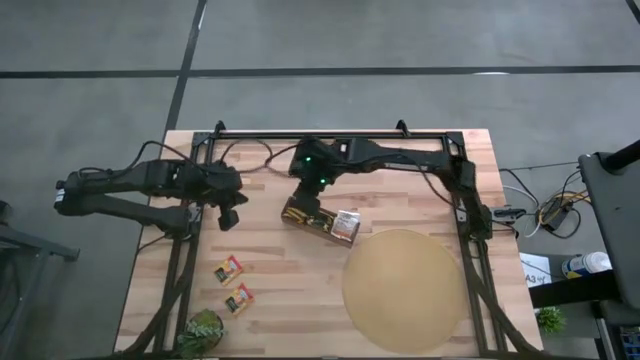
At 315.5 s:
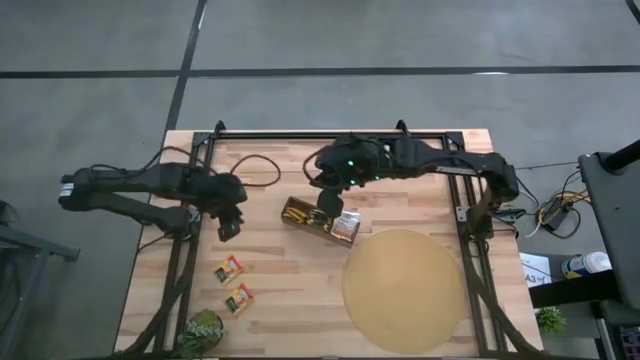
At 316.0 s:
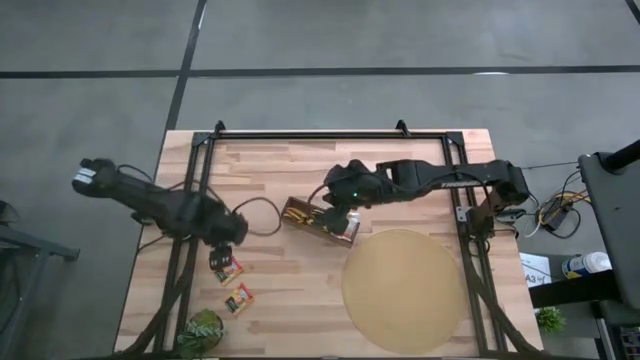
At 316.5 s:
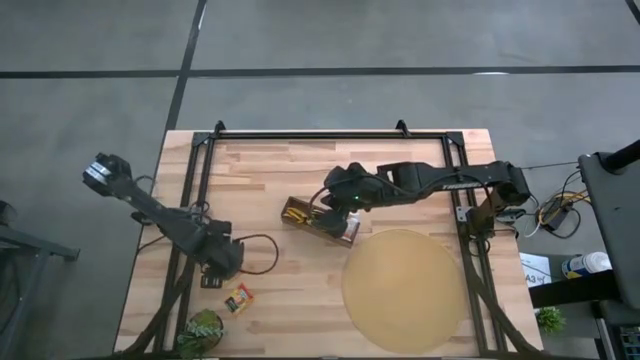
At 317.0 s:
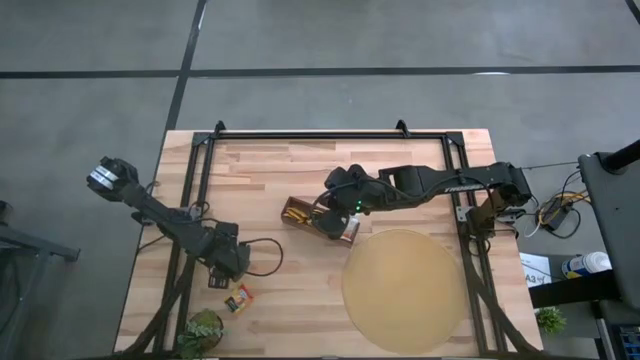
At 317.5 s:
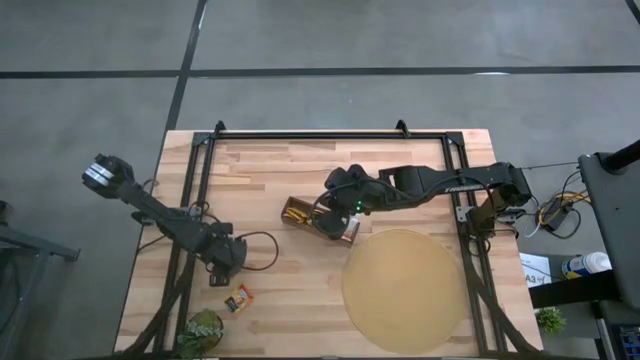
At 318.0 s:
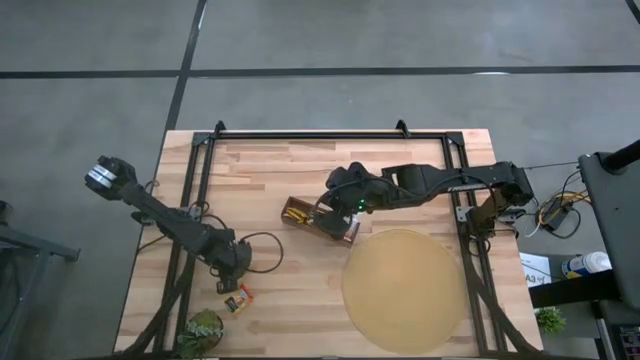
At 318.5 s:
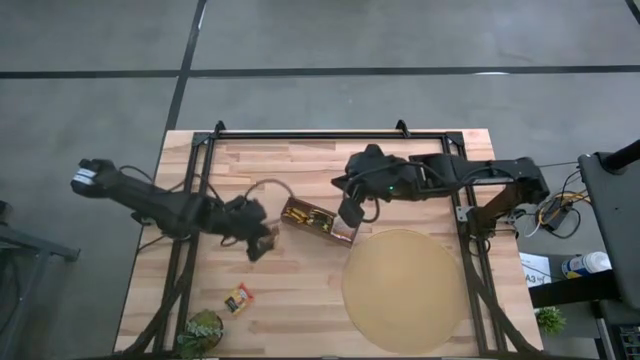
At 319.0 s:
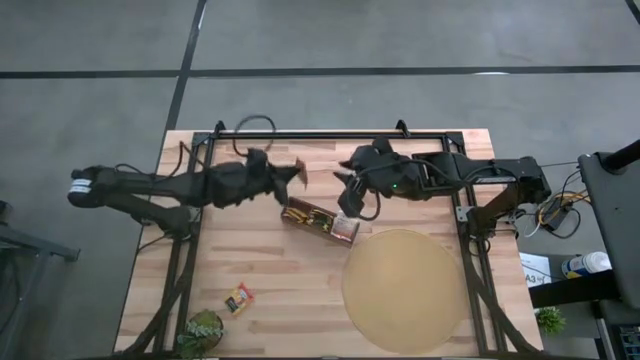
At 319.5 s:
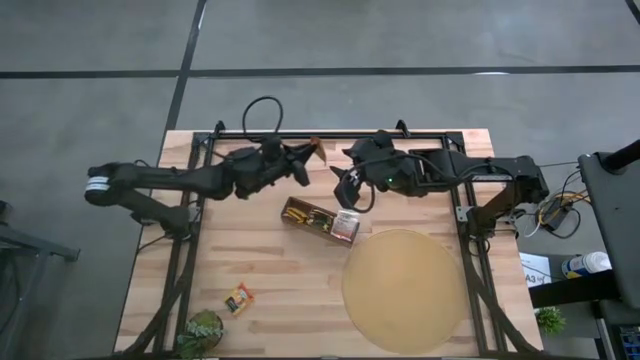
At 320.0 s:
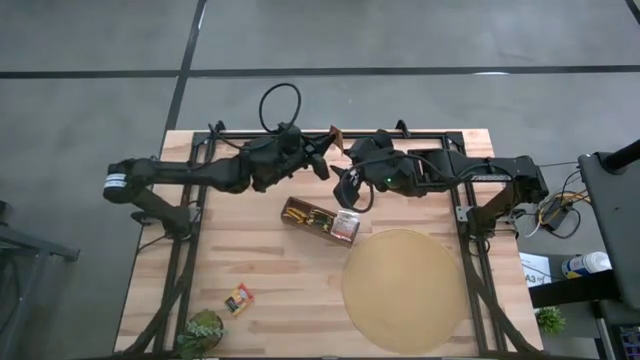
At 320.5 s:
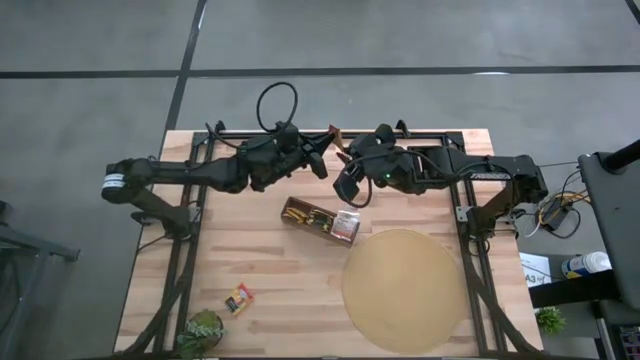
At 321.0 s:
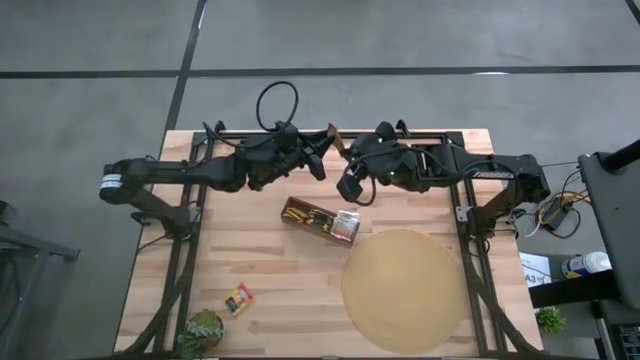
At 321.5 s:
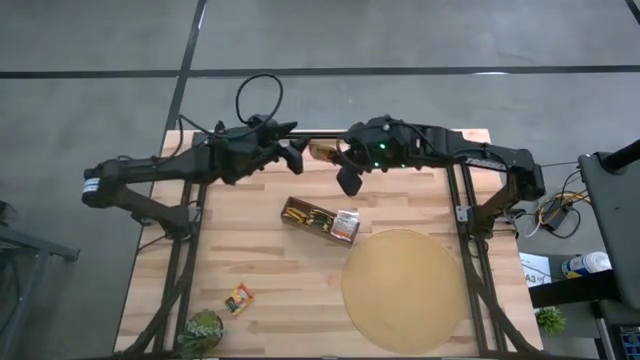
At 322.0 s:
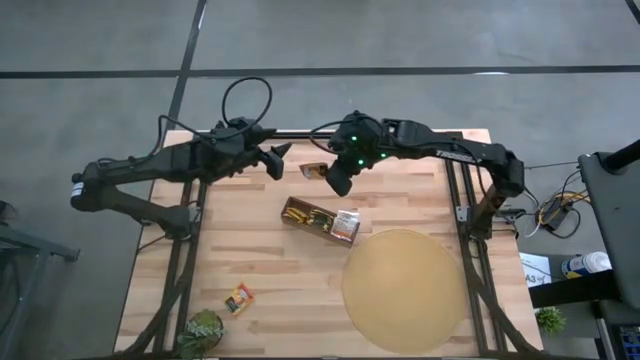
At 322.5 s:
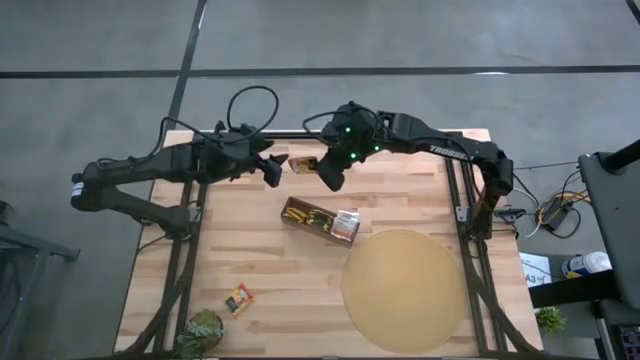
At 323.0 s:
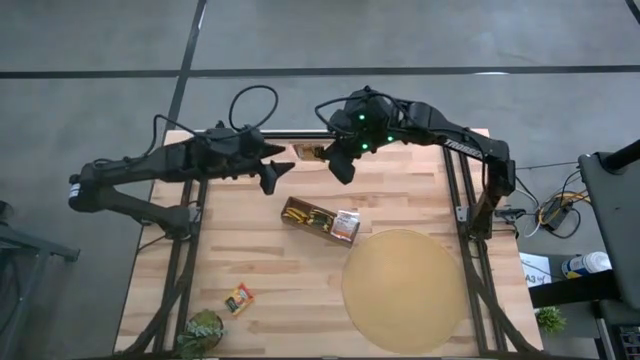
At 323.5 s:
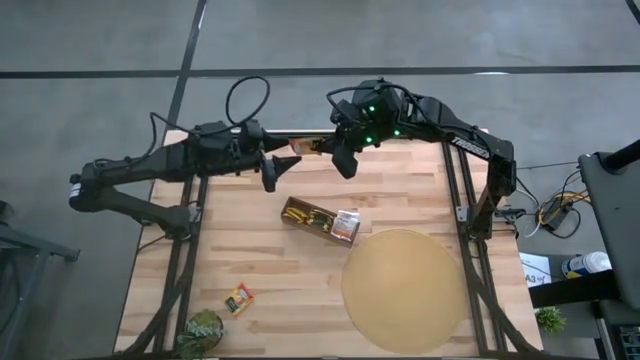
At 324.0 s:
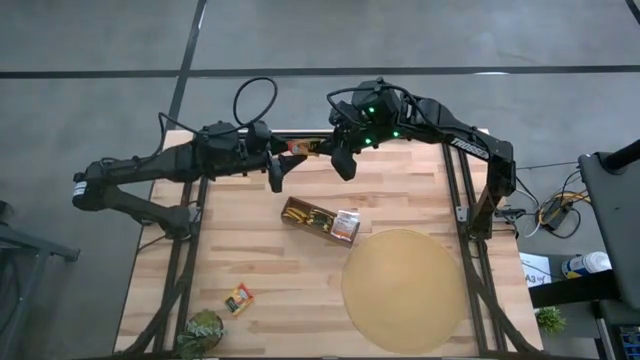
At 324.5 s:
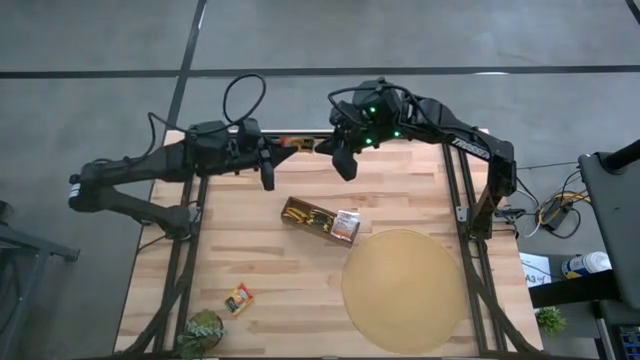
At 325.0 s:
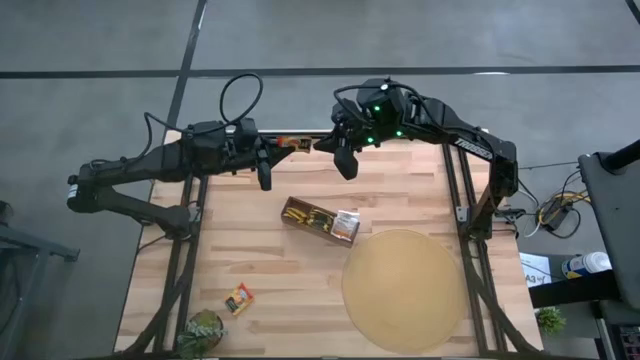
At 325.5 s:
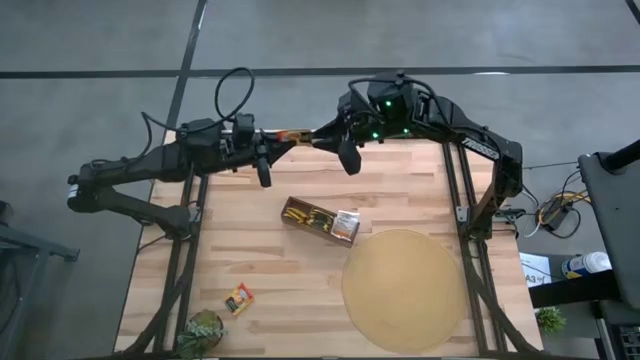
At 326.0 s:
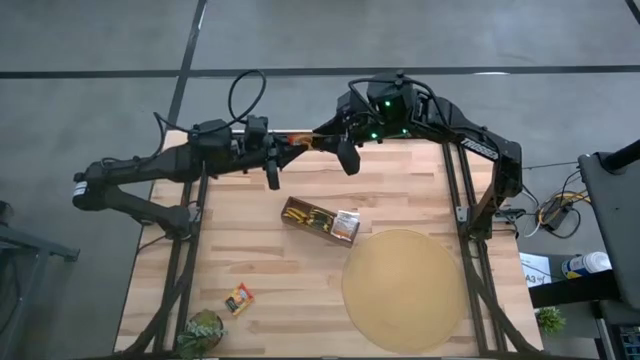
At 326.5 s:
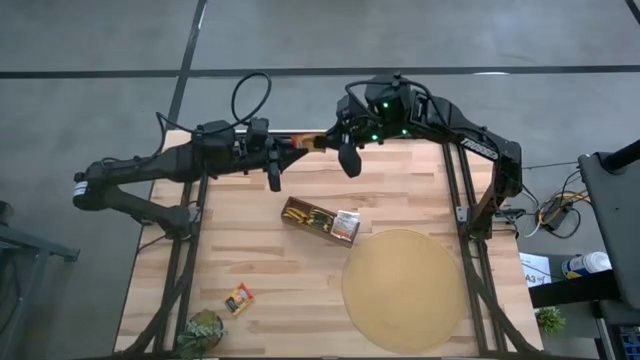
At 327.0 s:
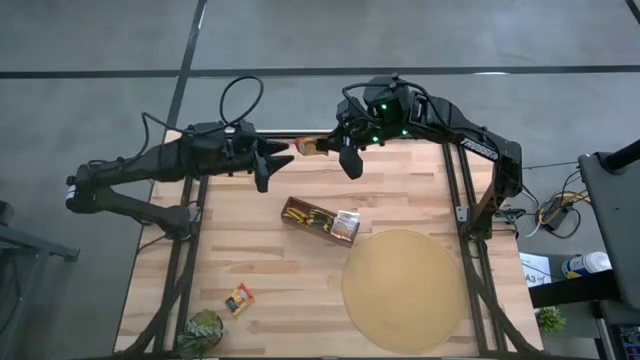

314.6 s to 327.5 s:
Task: Pick & Place Tea
Put the orange tea bag into the left section of the wooden organizer

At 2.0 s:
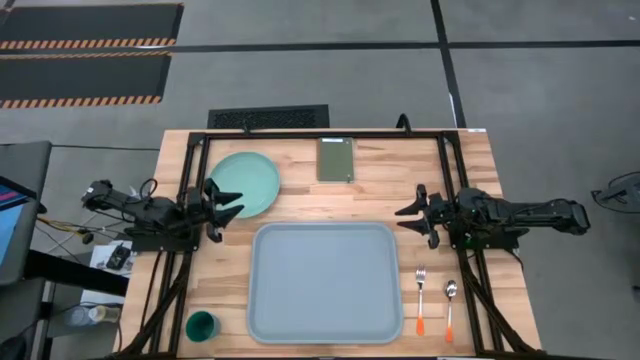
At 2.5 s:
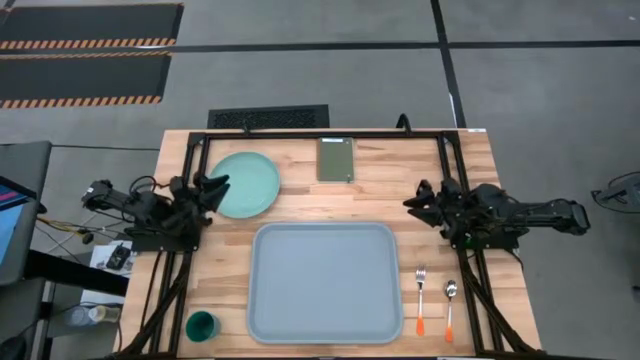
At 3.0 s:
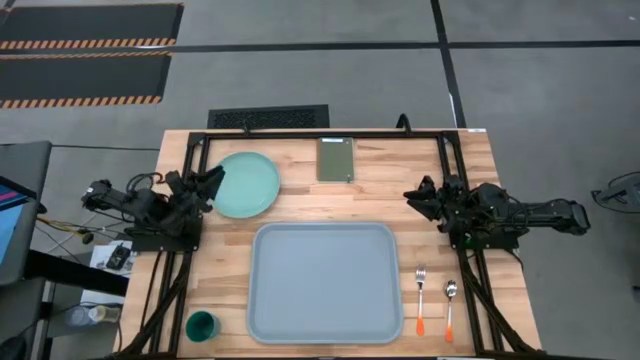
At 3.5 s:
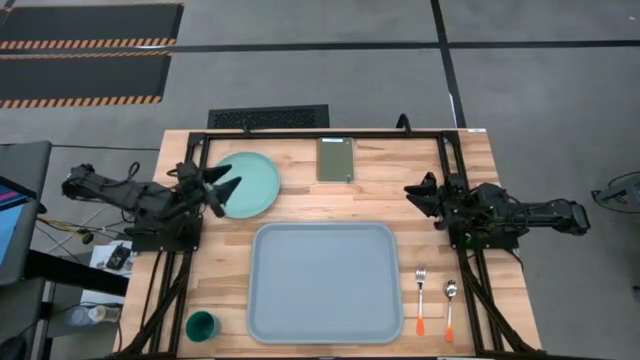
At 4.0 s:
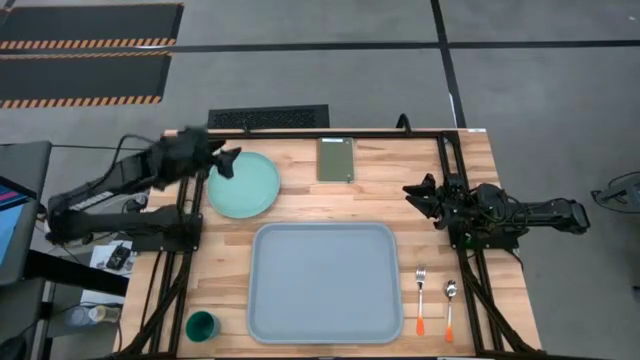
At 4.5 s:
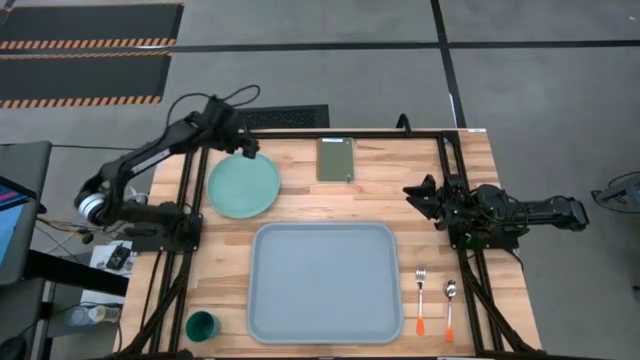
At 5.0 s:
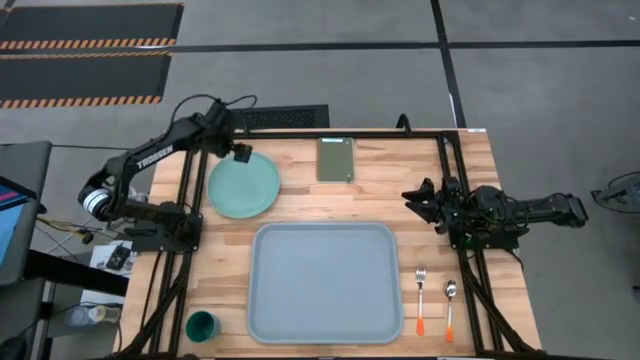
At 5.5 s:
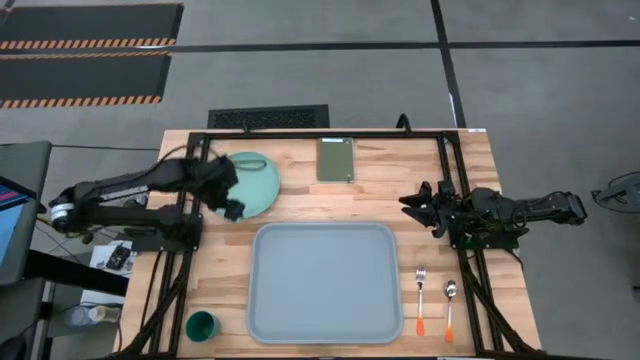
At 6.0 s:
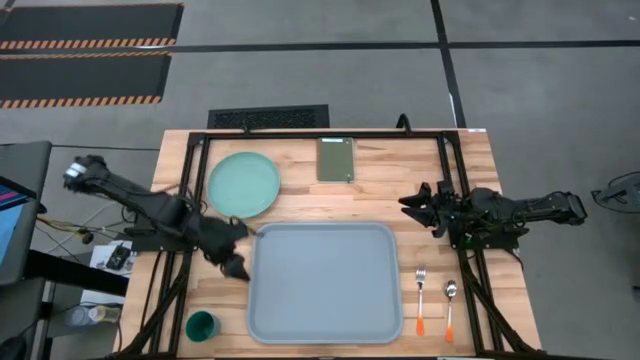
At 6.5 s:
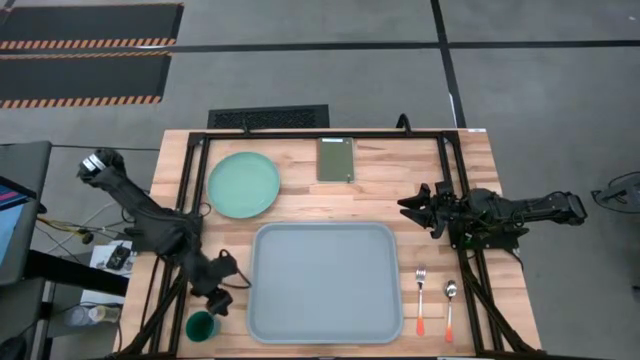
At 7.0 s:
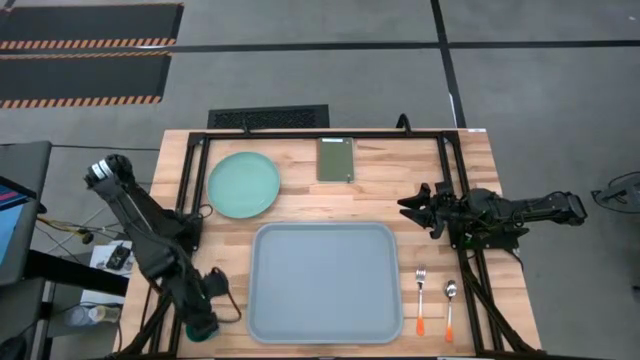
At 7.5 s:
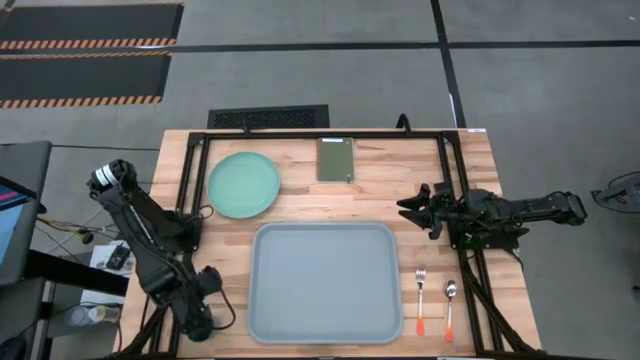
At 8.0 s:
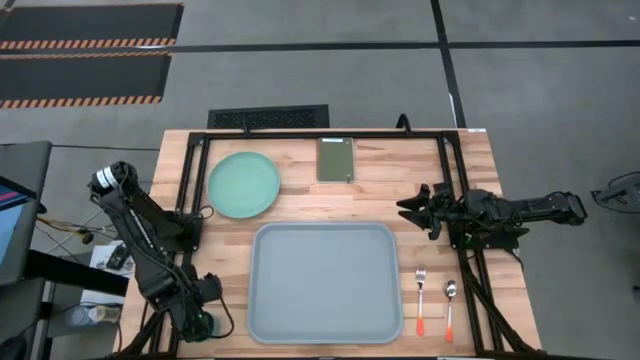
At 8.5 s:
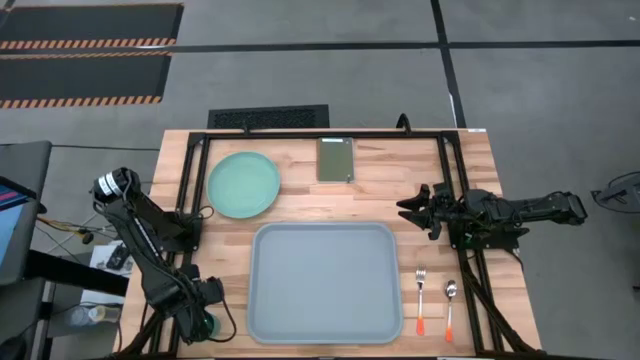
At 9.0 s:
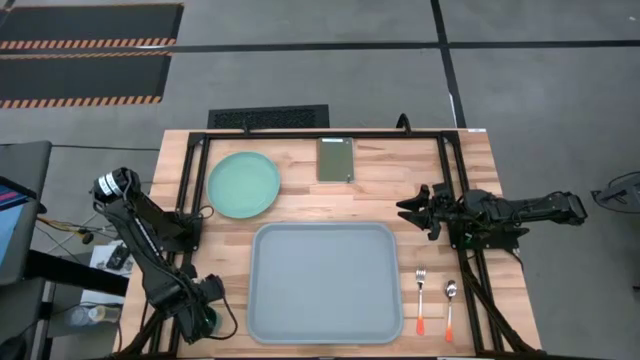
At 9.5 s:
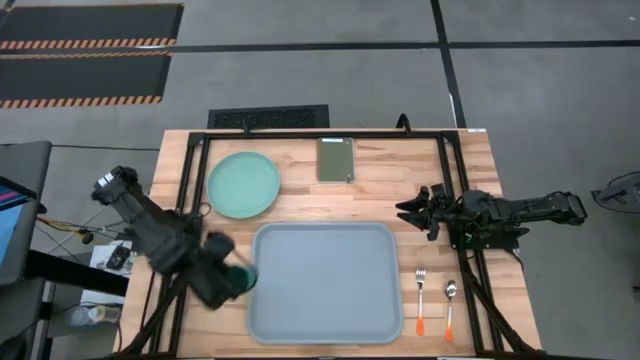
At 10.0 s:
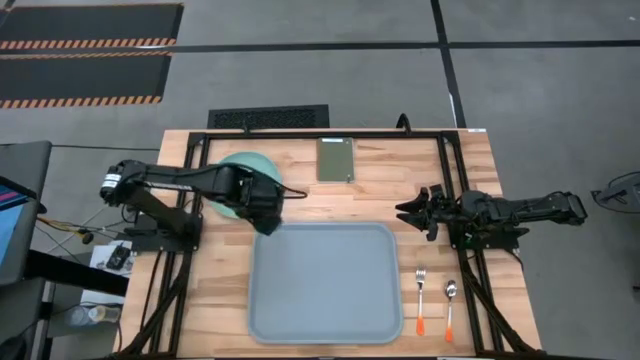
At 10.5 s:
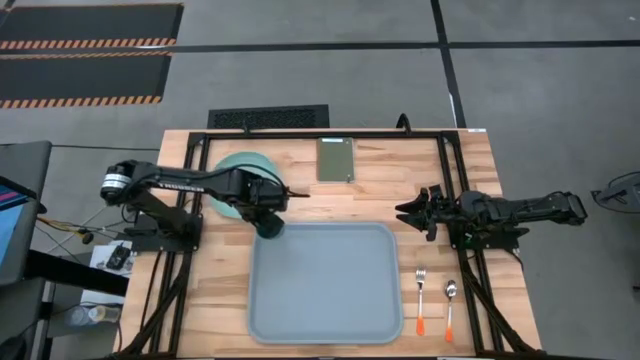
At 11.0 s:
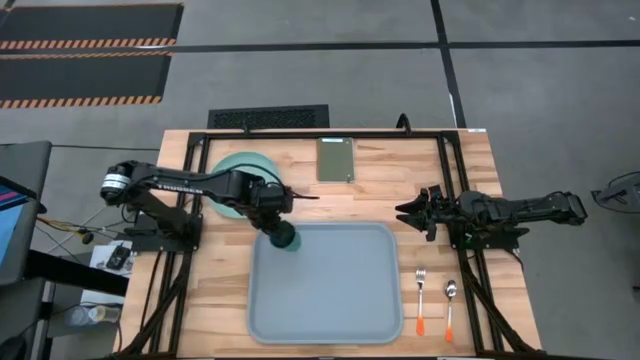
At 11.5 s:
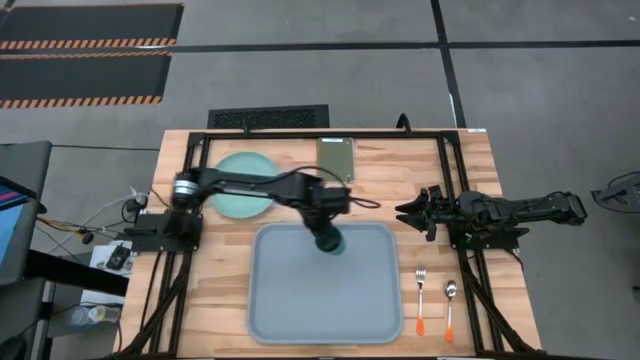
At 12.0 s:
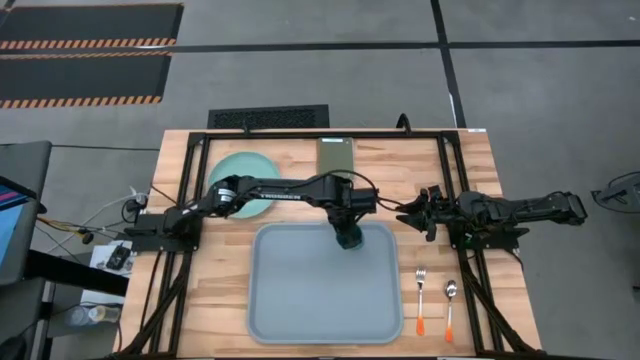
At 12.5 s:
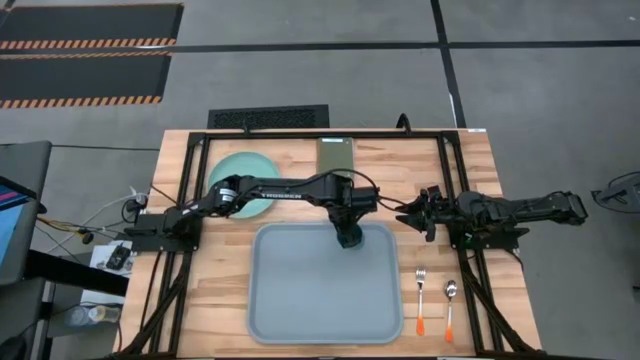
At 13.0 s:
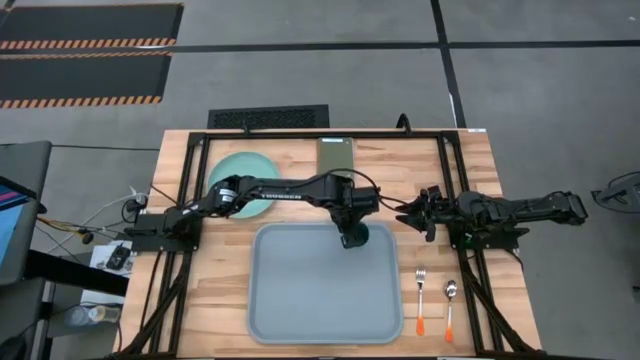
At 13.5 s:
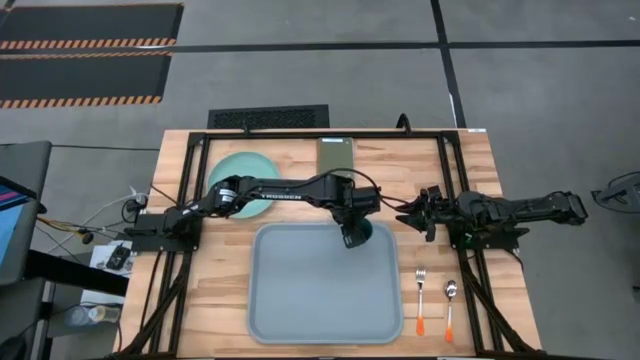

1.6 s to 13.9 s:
Task: Pick and place plate/cup/fork/spoon on tray
Put the blue cup on the top right of the blue tray
